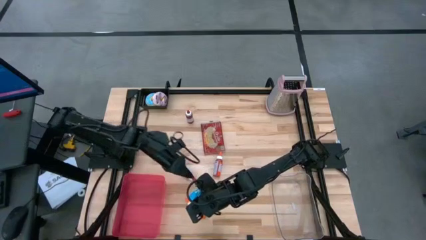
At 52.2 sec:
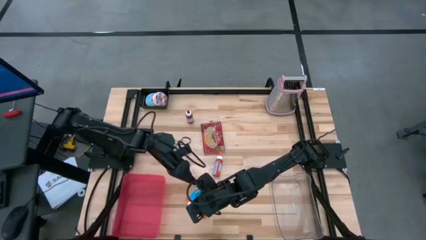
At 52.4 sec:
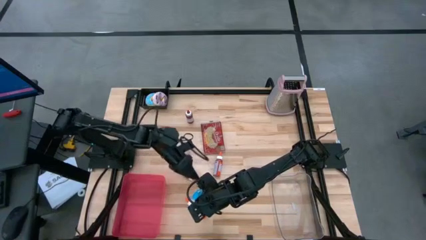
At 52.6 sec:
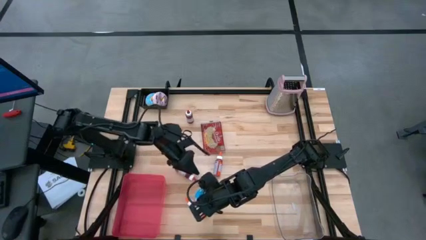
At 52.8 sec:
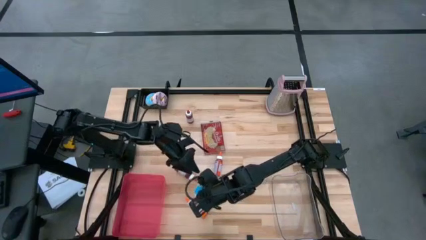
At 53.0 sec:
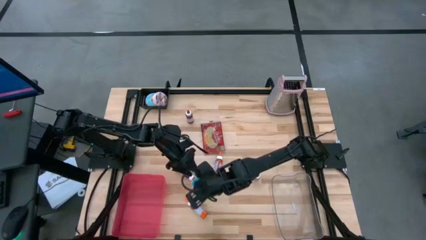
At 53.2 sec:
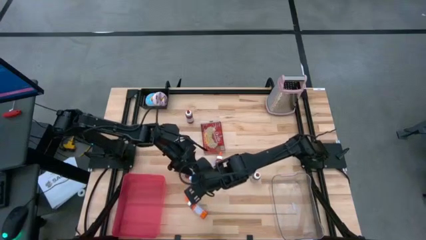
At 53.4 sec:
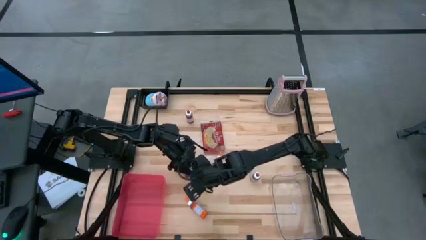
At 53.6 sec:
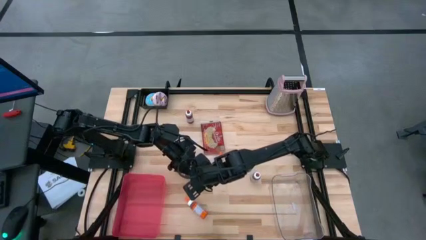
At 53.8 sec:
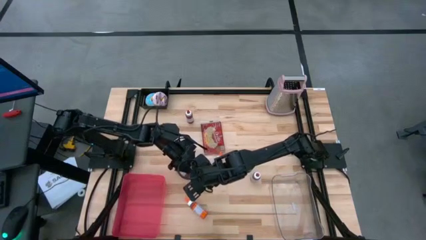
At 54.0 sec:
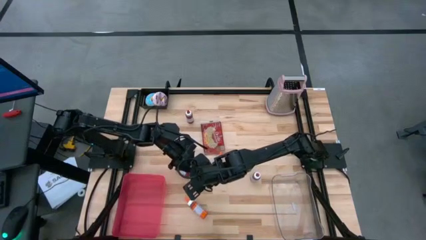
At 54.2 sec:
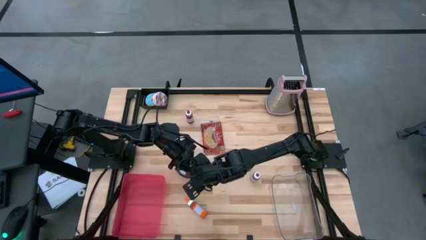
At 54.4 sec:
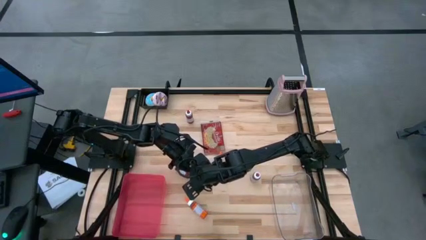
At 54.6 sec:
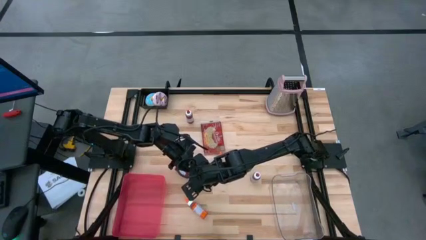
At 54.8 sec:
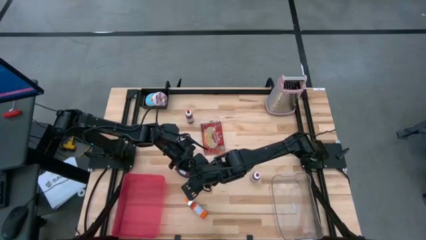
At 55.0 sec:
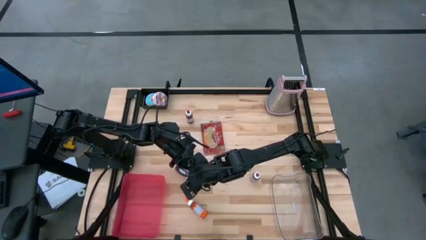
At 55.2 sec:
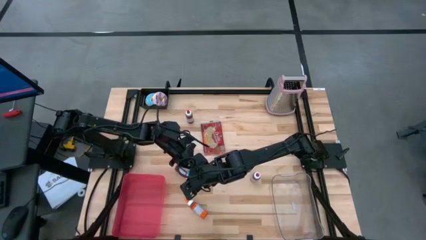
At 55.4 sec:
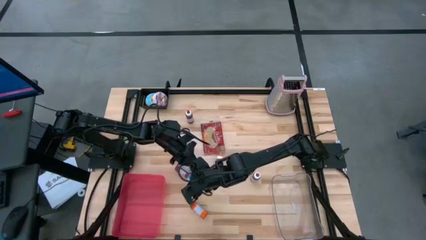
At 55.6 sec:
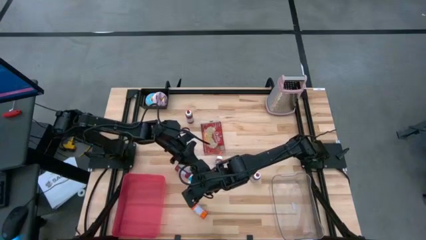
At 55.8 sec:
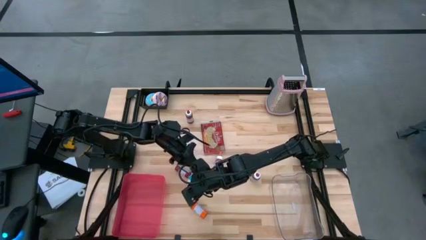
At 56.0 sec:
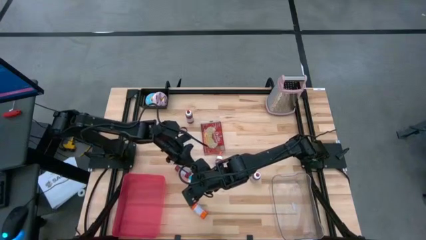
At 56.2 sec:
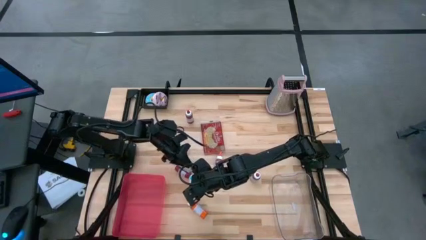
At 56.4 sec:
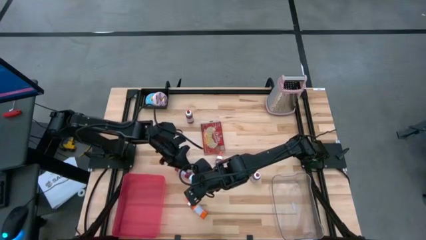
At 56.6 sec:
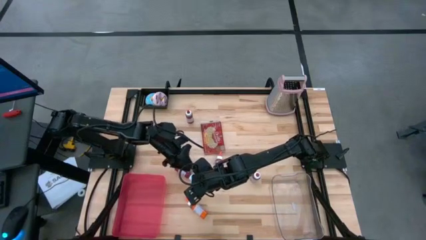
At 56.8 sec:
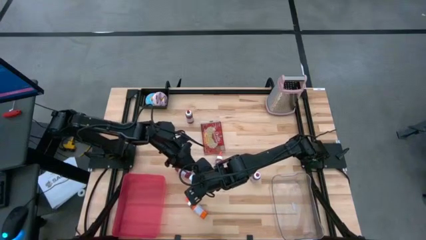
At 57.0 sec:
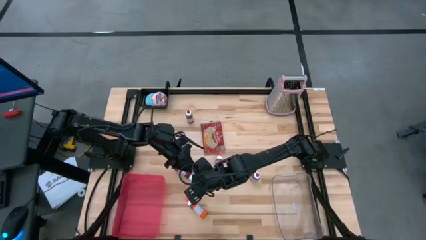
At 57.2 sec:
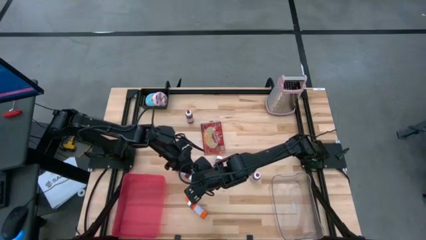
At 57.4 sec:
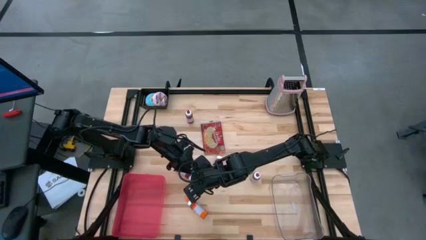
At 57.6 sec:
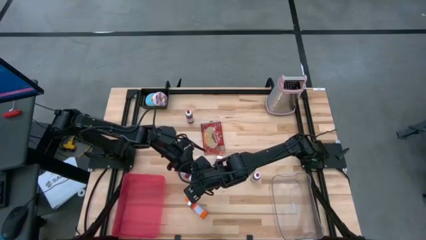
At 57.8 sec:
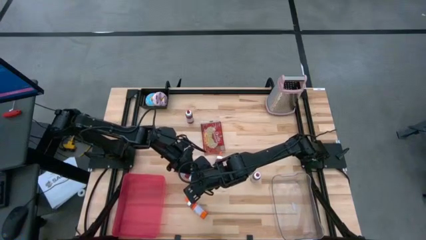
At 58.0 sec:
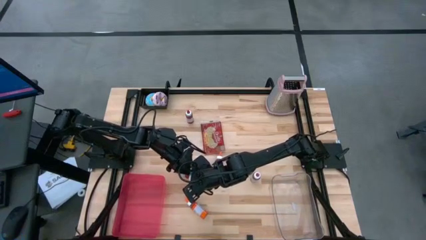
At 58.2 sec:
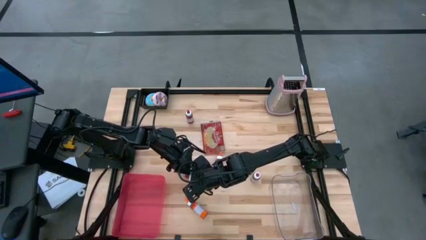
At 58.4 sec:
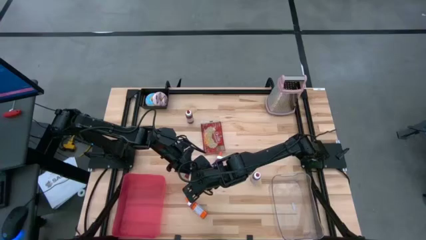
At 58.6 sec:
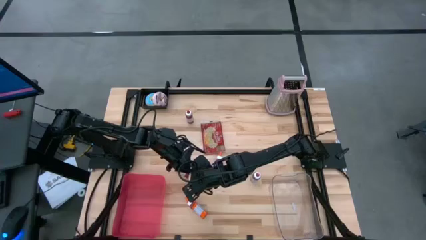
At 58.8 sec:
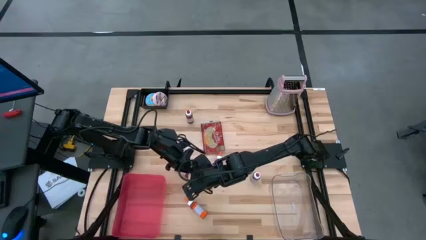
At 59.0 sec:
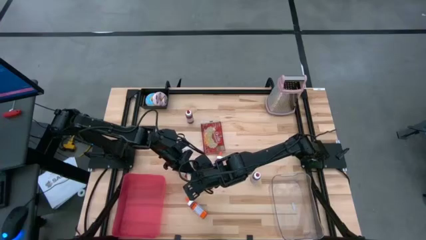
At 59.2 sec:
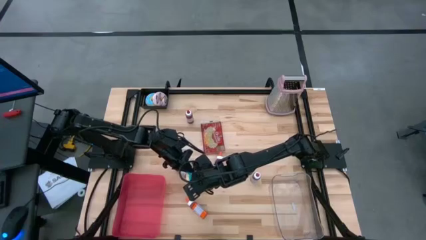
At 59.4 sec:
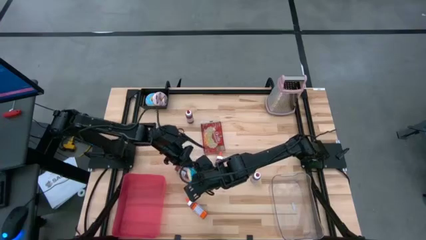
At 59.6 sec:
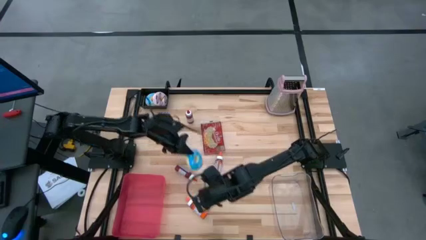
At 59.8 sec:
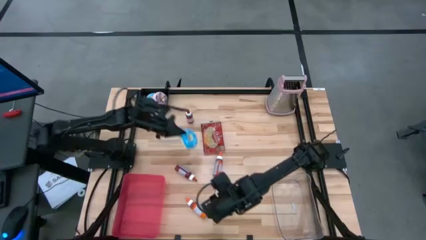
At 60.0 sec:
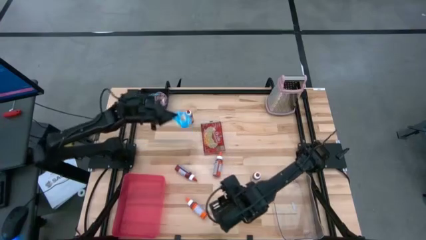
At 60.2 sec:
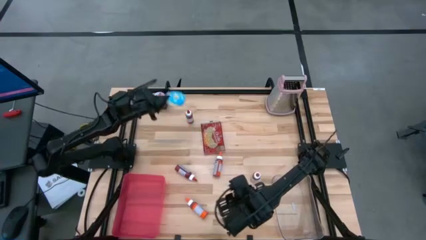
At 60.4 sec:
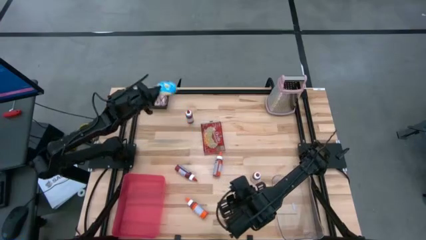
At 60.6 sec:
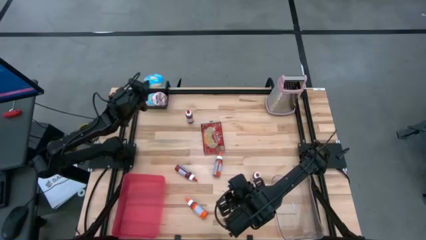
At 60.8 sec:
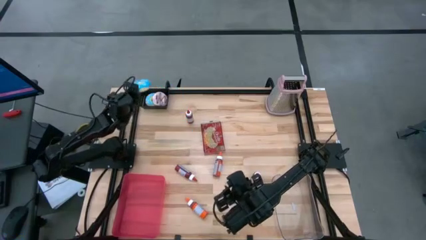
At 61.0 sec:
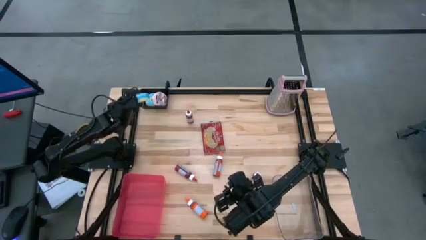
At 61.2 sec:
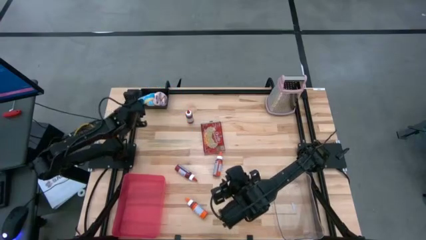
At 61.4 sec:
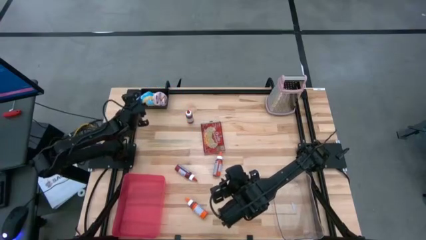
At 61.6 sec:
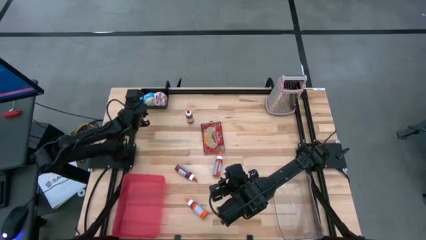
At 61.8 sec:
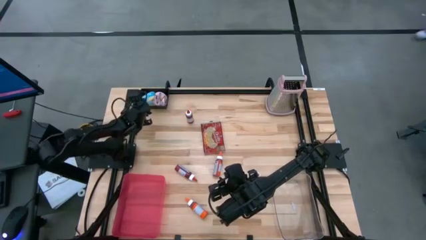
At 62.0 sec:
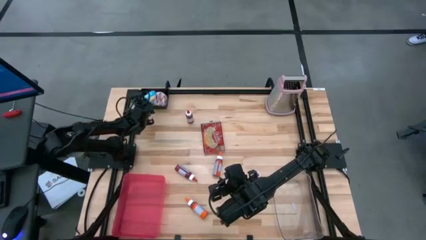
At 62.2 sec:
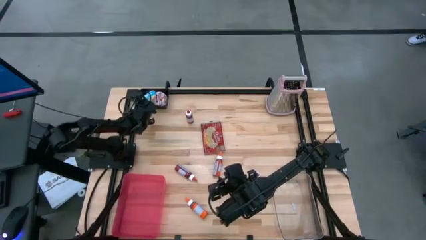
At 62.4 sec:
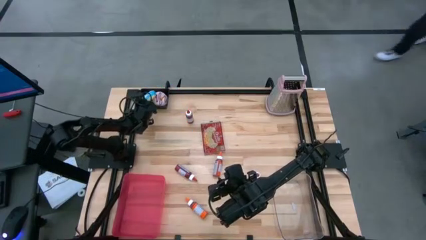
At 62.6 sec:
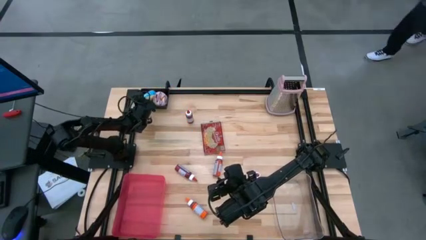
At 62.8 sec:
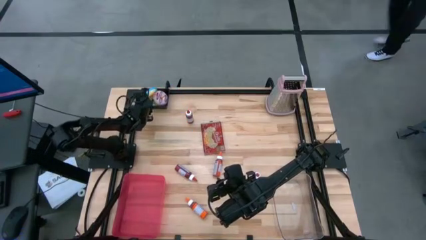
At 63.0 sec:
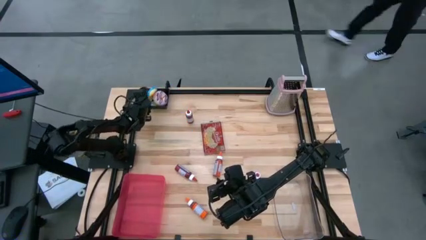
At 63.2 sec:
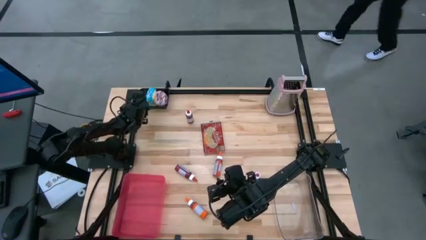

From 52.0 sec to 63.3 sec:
Put the blue donut into the black bin
